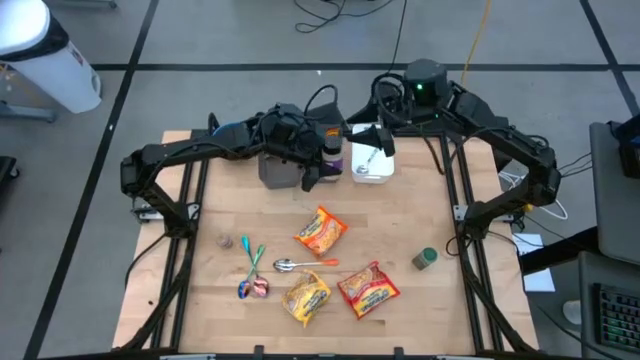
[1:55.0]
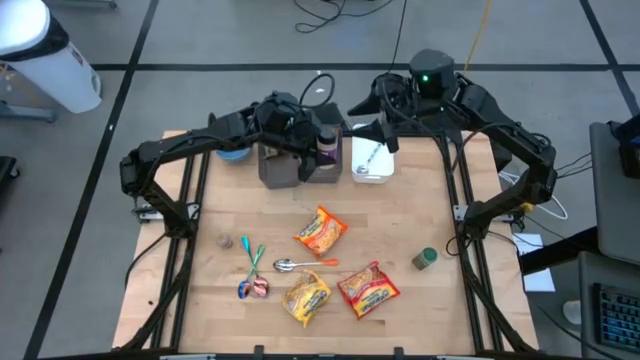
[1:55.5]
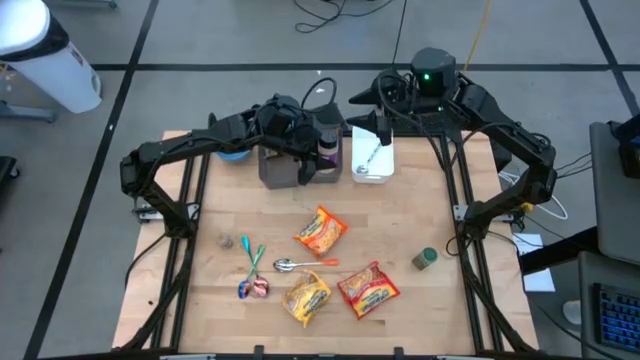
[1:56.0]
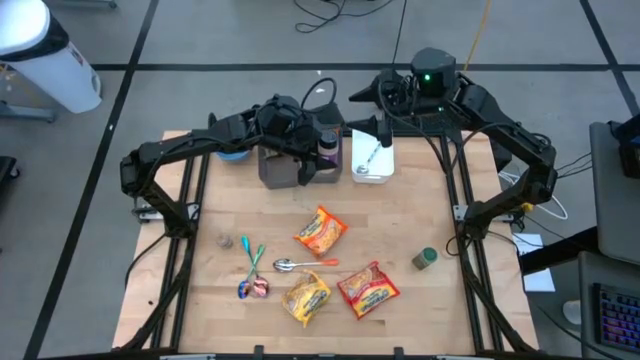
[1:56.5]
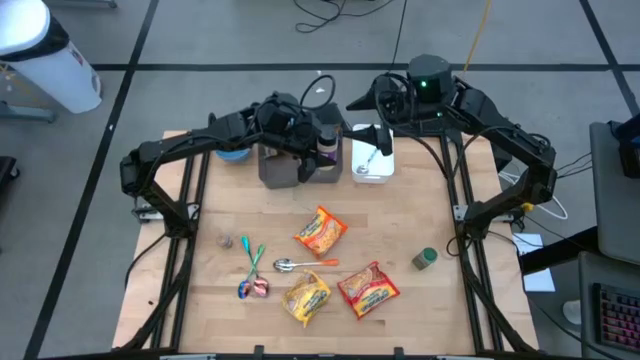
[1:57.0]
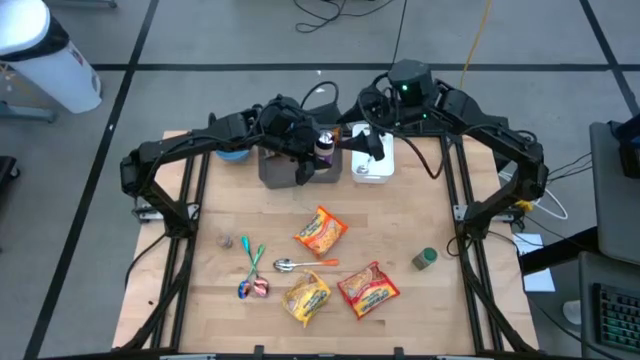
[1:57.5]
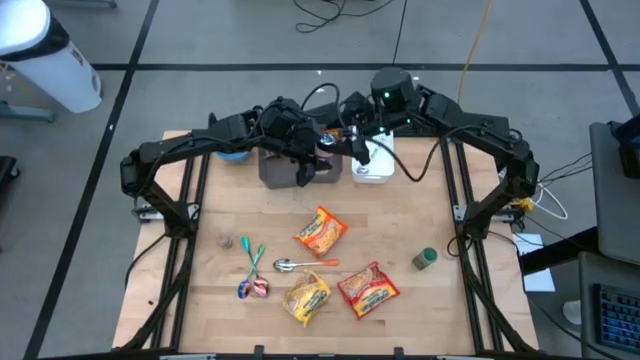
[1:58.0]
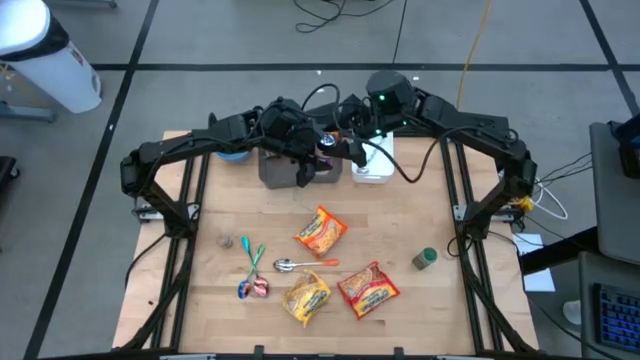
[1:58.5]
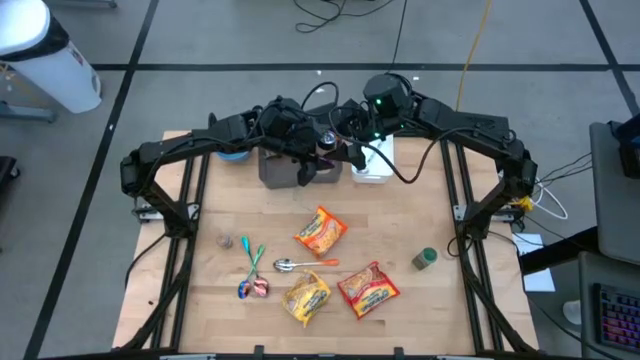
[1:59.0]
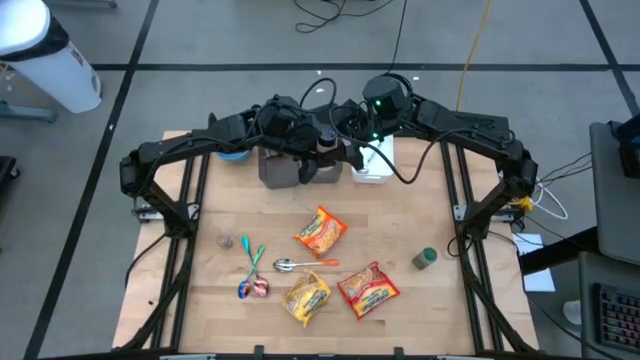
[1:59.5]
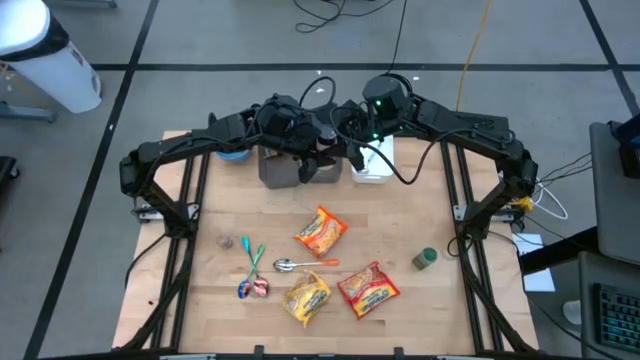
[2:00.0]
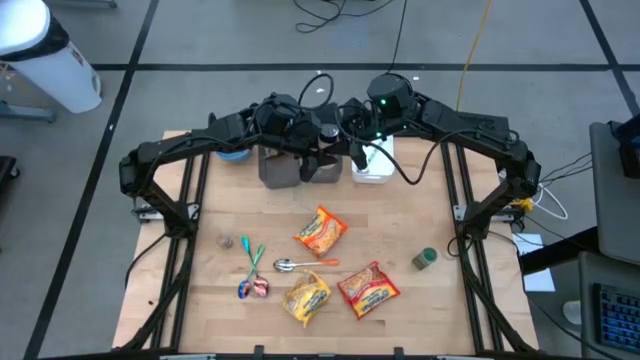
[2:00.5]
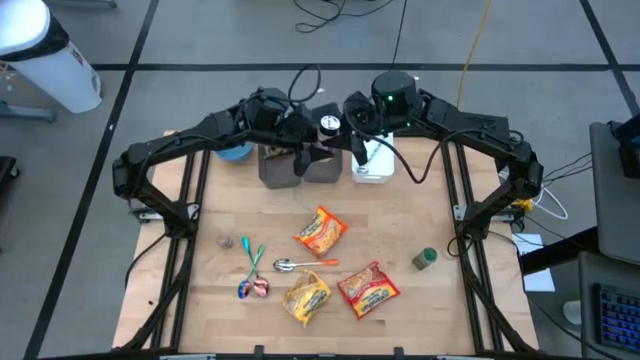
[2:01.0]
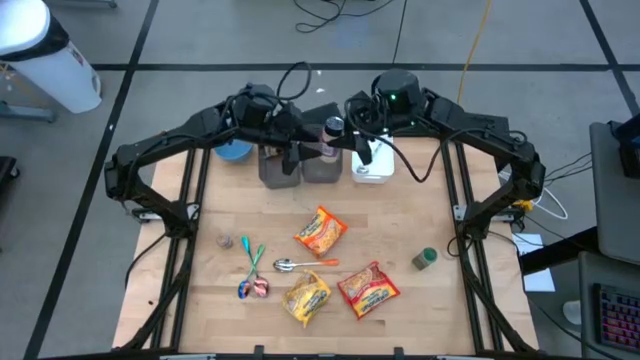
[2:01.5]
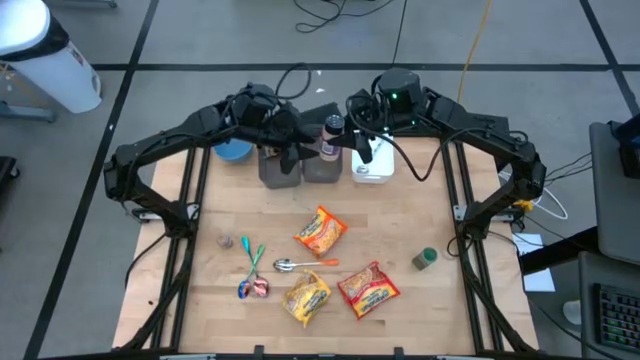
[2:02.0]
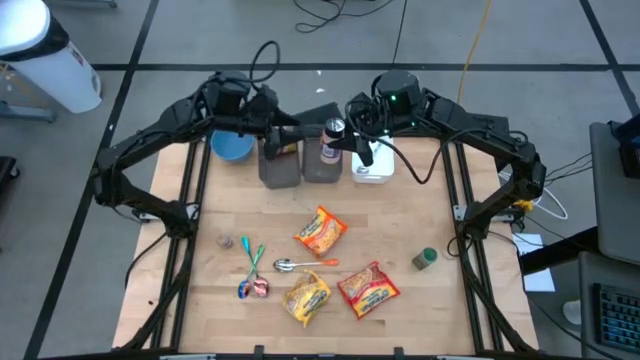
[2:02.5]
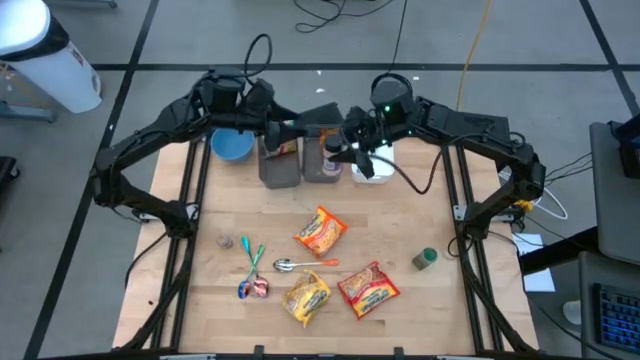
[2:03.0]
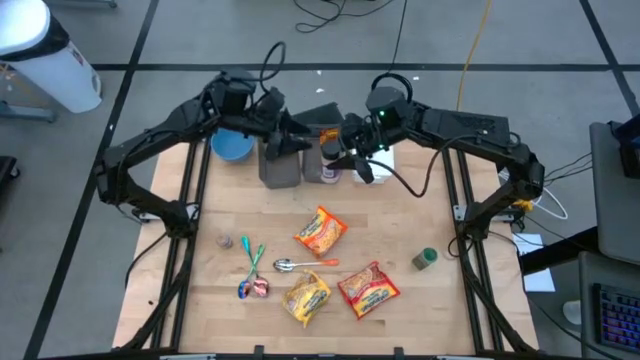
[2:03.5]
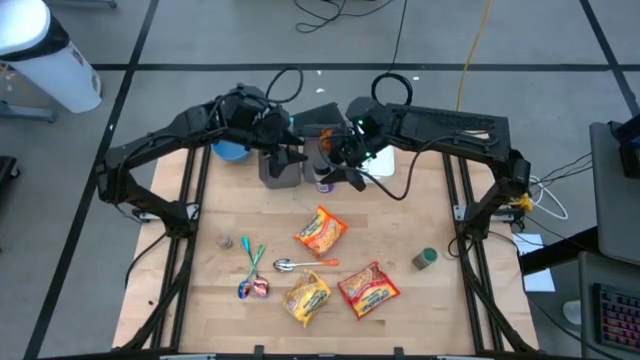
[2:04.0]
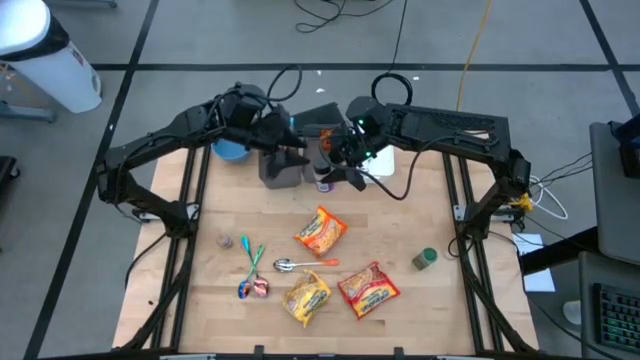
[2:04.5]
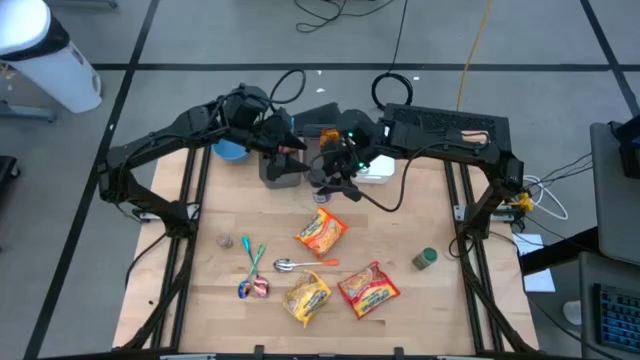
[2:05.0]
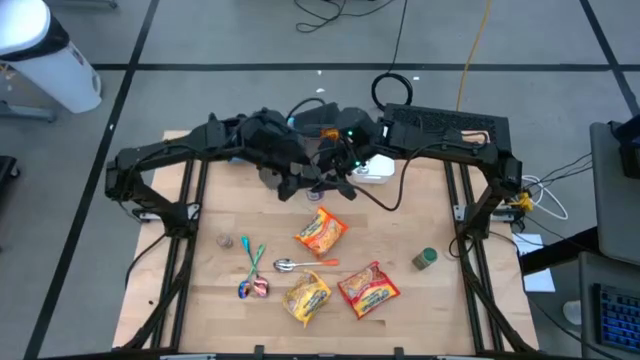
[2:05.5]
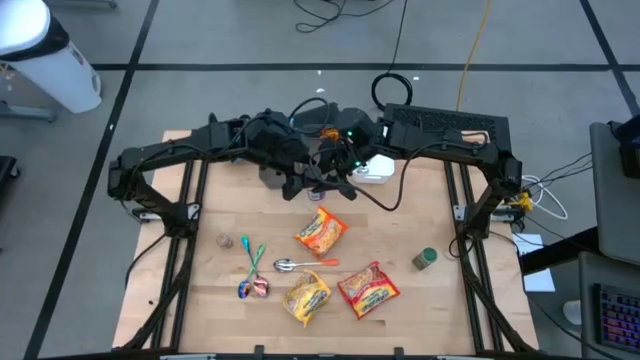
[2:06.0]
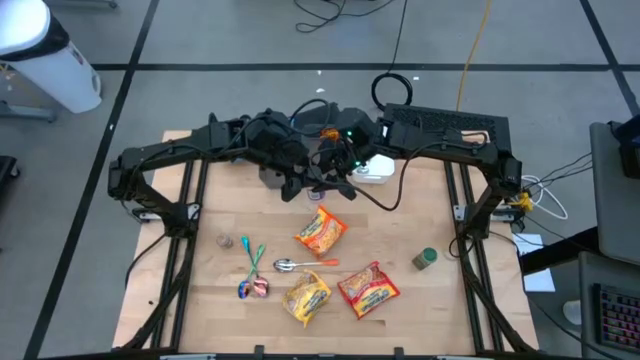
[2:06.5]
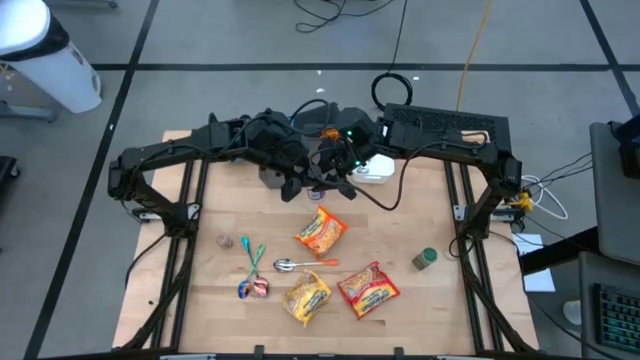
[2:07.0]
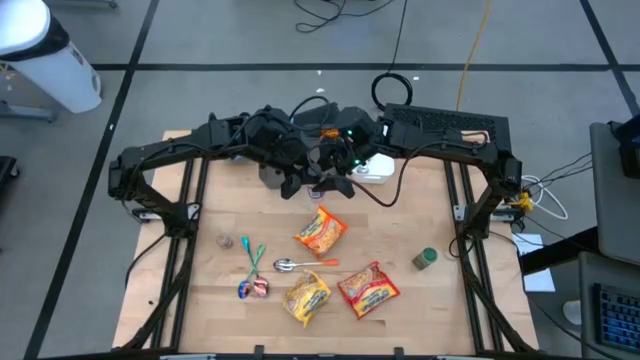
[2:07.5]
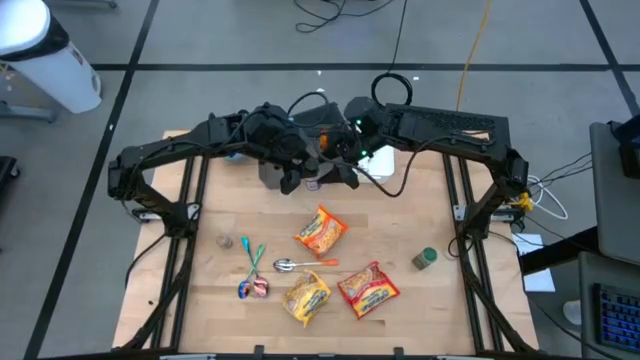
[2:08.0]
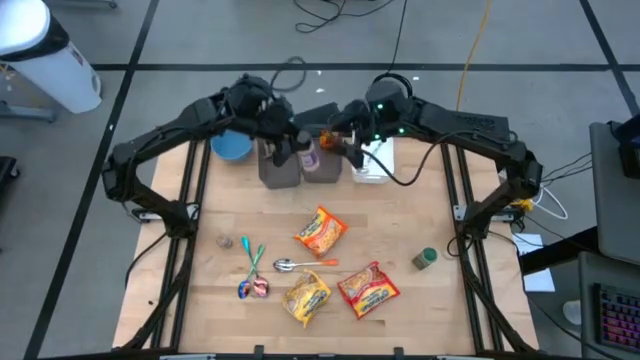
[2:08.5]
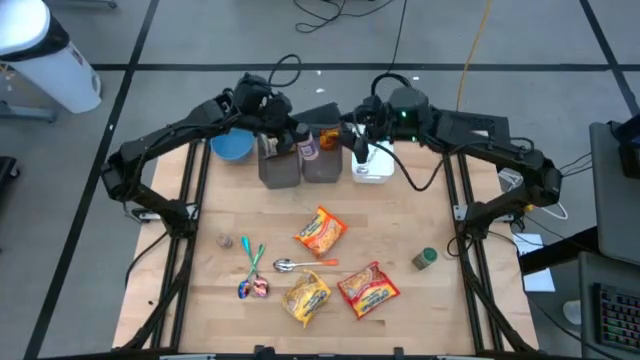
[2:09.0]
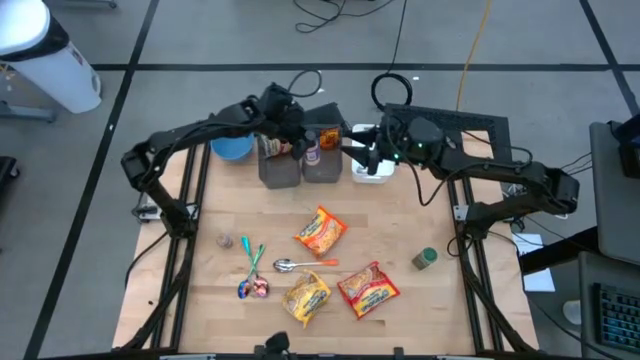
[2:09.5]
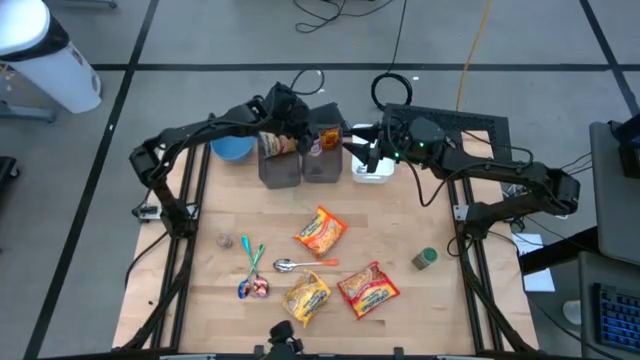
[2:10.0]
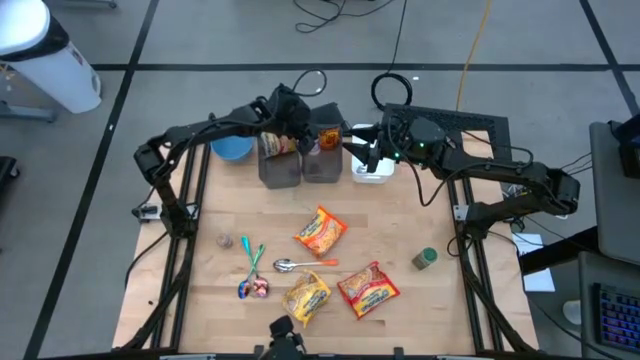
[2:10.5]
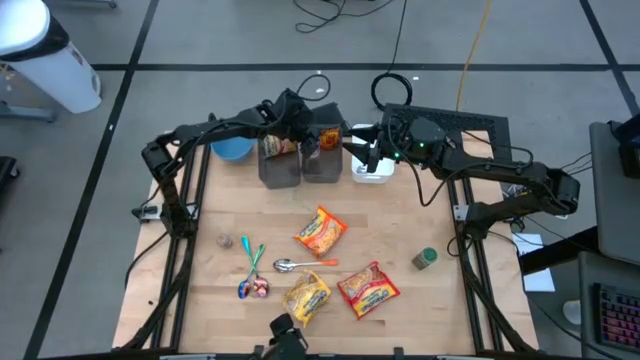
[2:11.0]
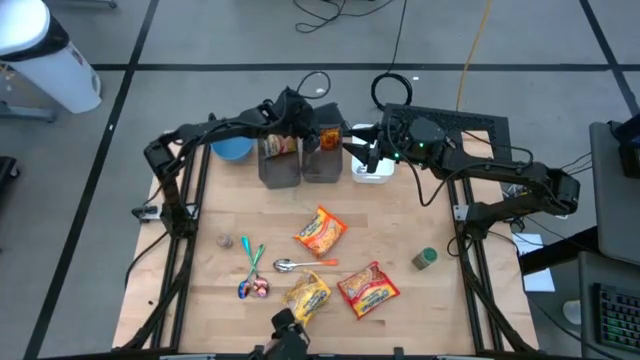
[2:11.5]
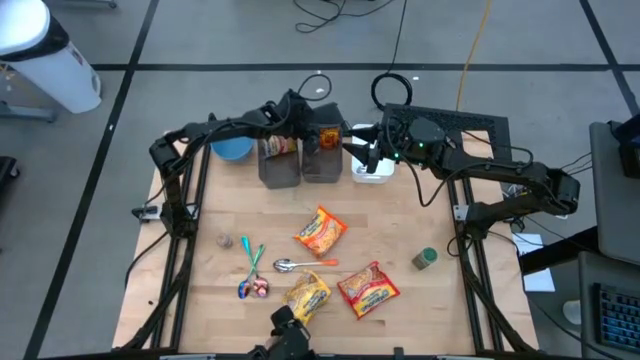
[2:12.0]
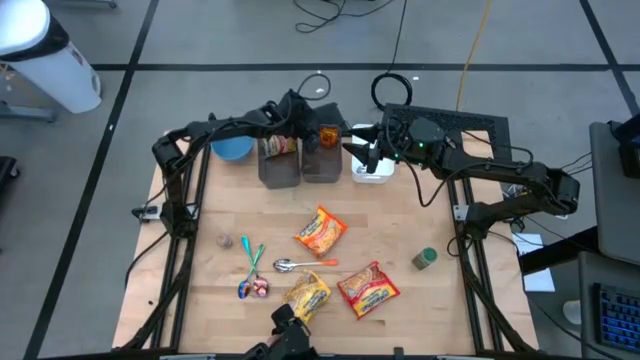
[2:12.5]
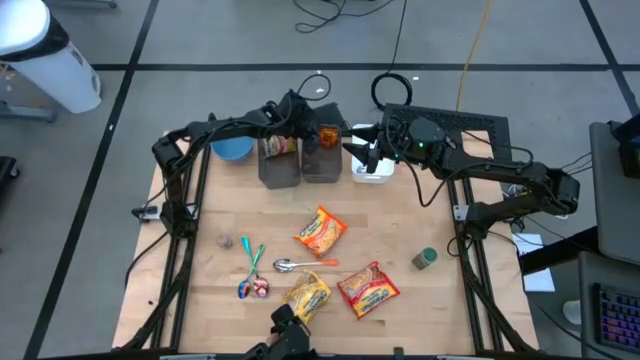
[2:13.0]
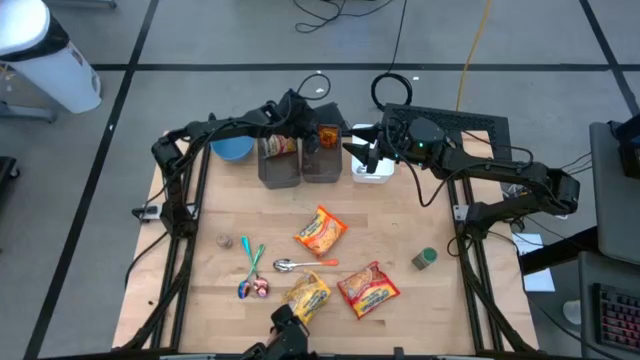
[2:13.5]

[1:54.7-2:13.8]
Task: Pick & Place Food Item
Put the violet seasoning bottle into the right black bin

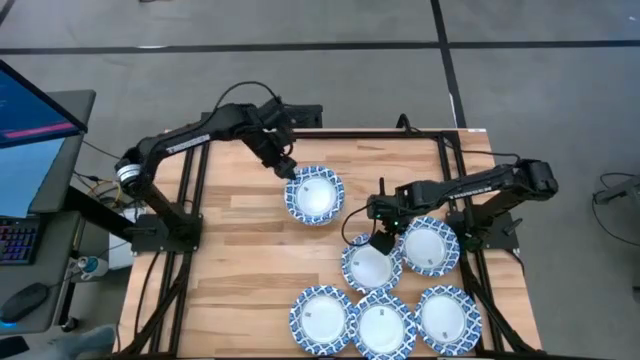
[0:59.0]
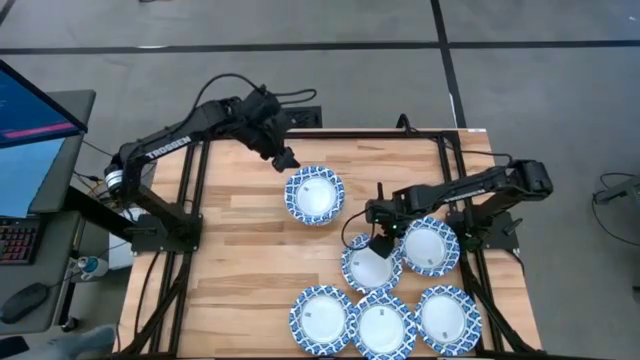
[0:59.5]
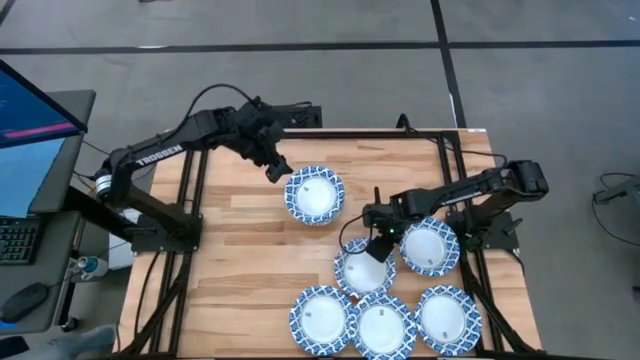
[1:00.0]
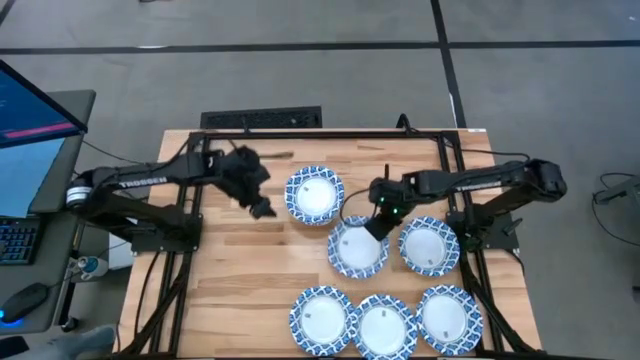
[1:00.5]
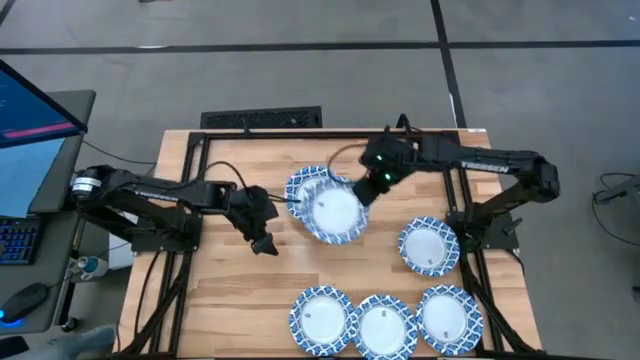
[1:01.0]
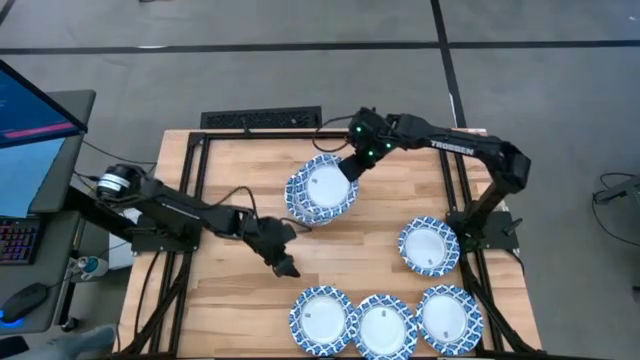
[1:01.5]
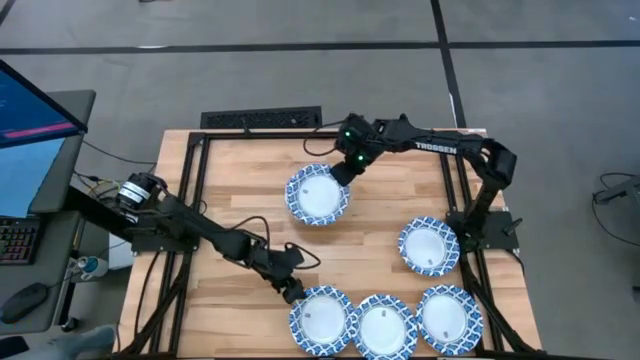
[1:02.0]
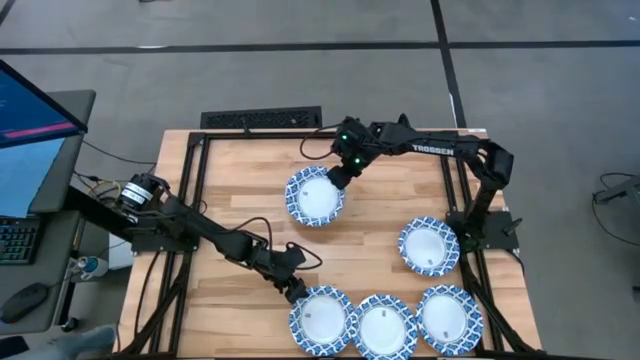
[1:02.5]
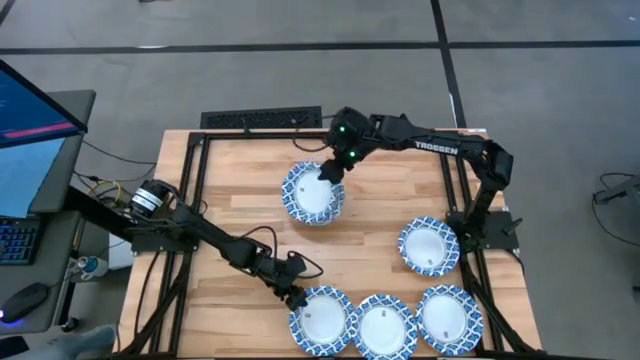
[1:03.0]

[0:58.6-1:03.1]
Task: Nest bowls inside each other
Stack the white bowl on the stacked white bowls
